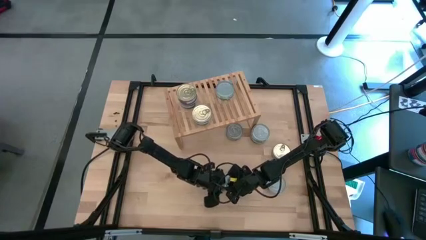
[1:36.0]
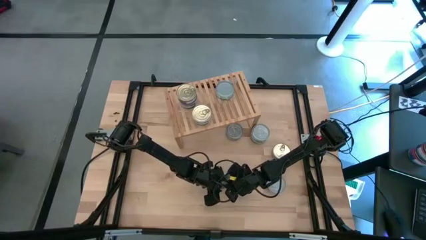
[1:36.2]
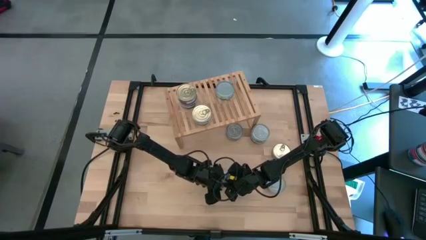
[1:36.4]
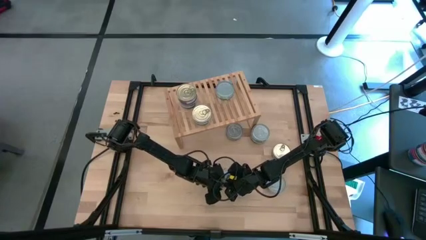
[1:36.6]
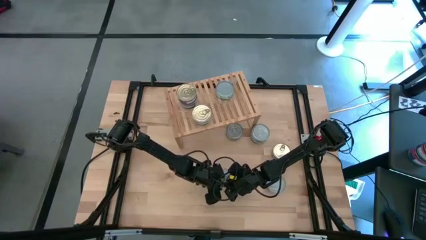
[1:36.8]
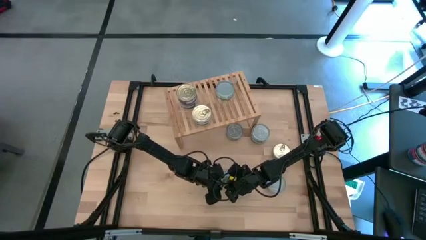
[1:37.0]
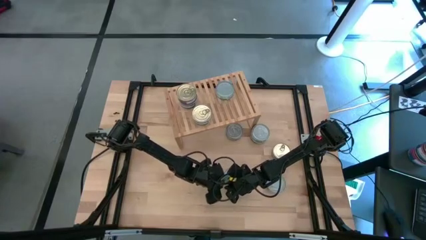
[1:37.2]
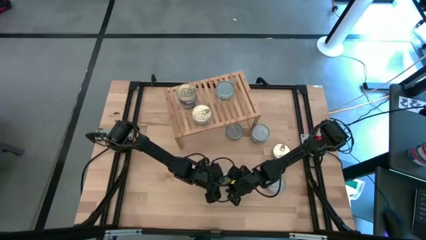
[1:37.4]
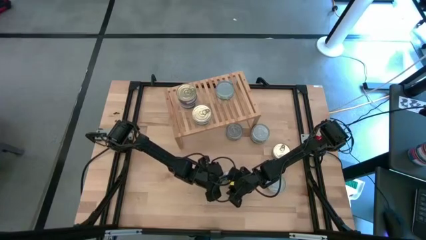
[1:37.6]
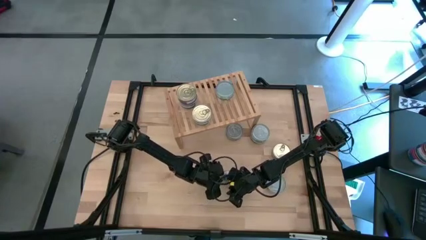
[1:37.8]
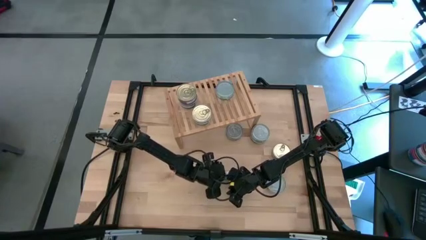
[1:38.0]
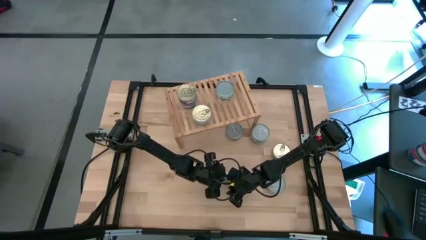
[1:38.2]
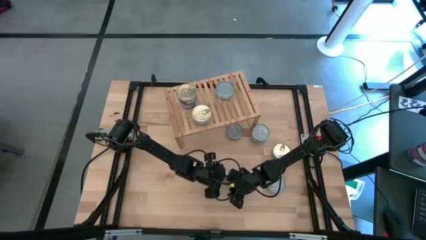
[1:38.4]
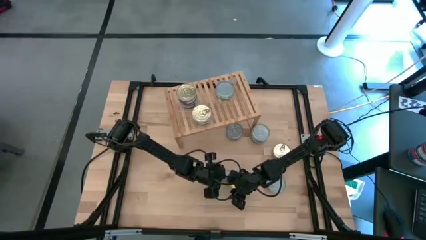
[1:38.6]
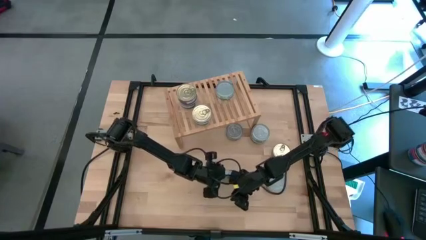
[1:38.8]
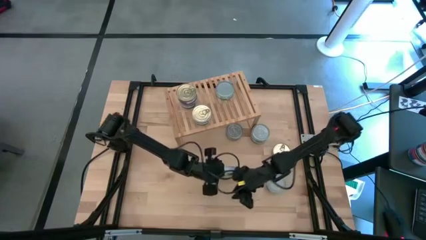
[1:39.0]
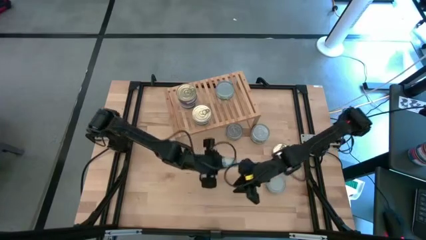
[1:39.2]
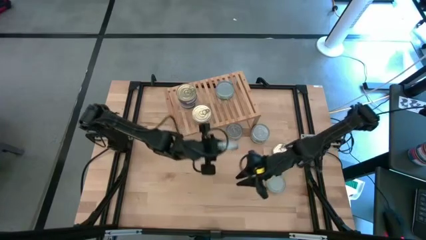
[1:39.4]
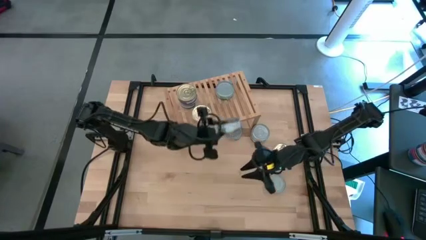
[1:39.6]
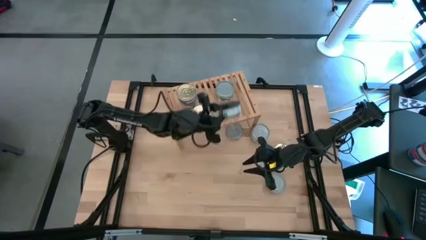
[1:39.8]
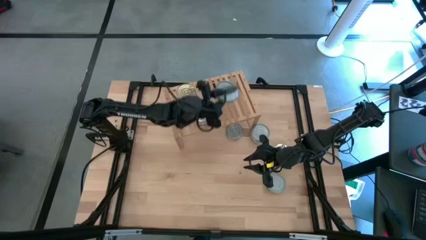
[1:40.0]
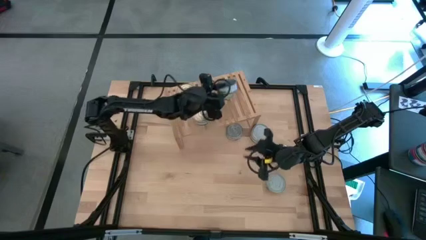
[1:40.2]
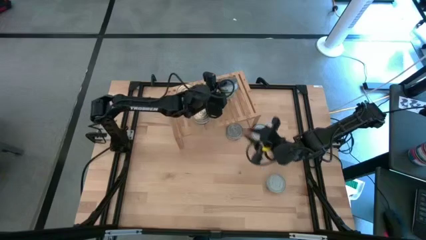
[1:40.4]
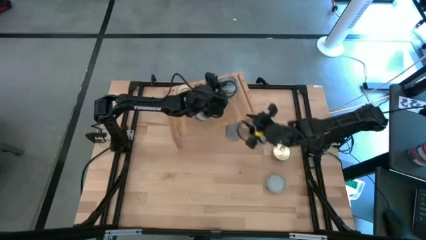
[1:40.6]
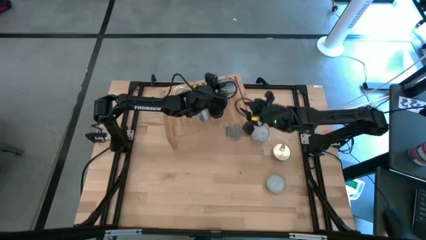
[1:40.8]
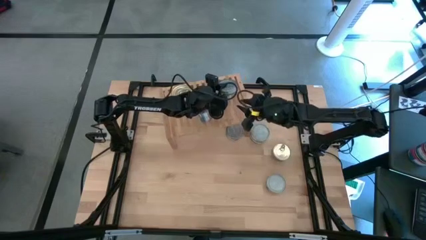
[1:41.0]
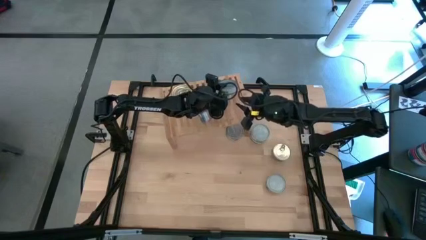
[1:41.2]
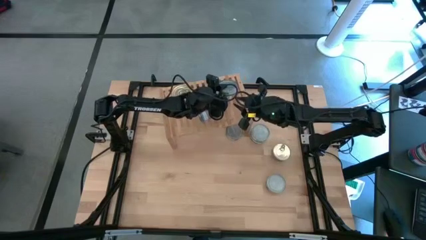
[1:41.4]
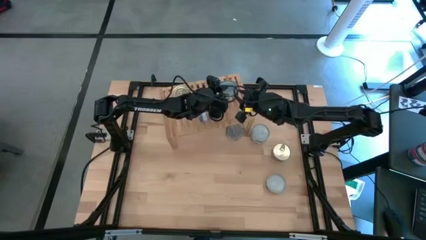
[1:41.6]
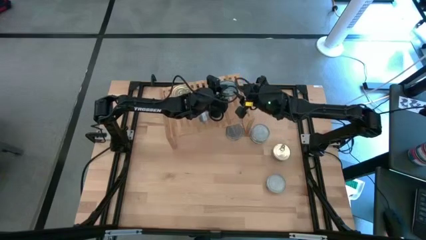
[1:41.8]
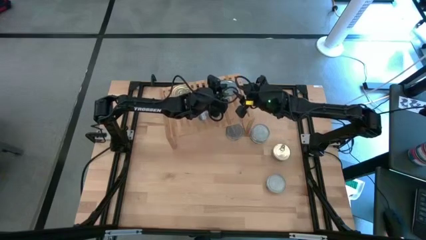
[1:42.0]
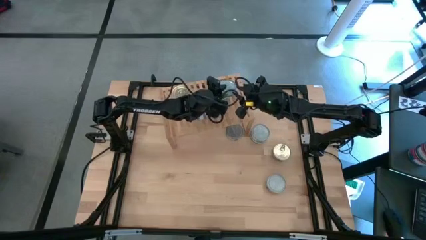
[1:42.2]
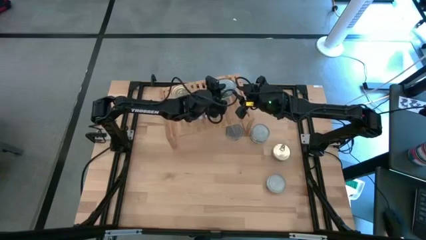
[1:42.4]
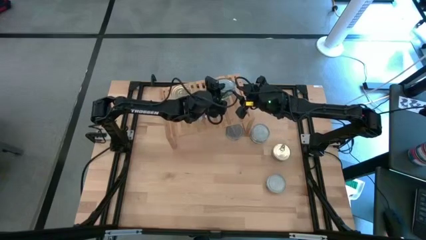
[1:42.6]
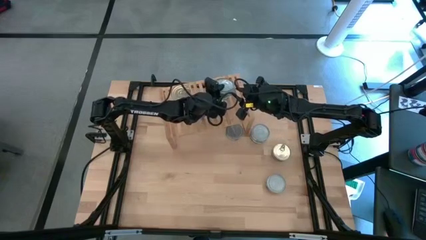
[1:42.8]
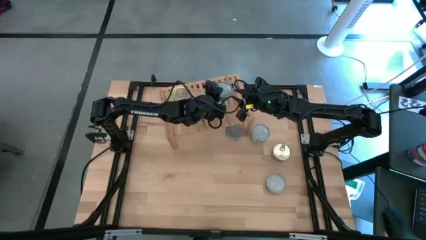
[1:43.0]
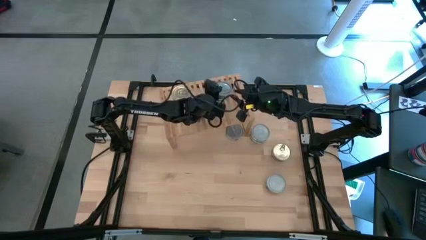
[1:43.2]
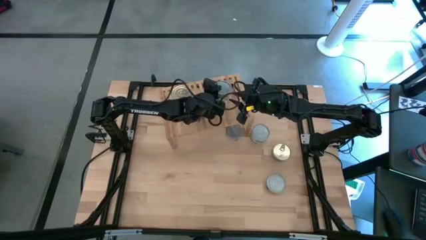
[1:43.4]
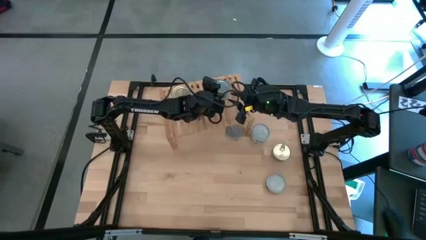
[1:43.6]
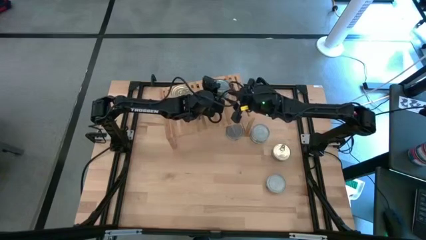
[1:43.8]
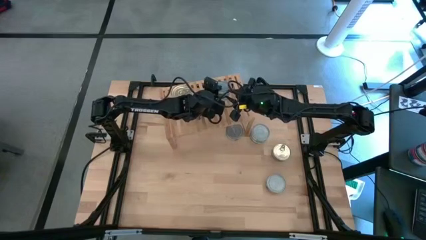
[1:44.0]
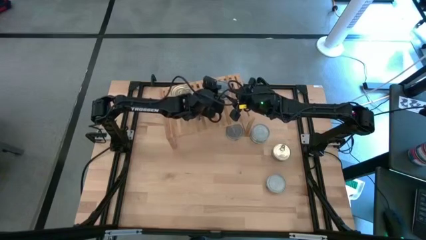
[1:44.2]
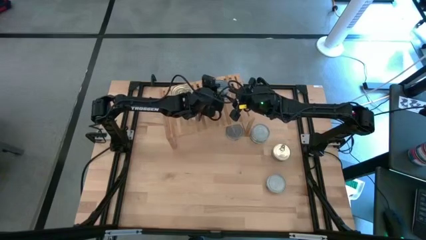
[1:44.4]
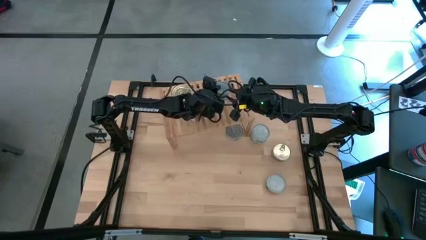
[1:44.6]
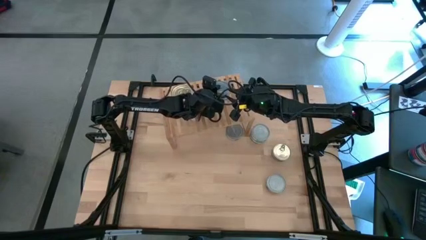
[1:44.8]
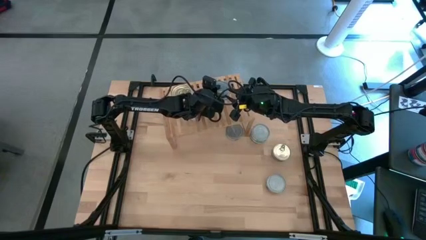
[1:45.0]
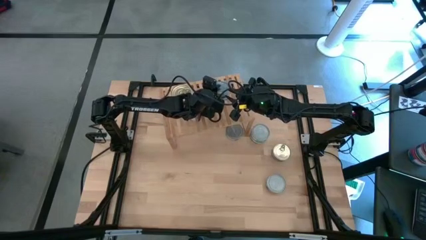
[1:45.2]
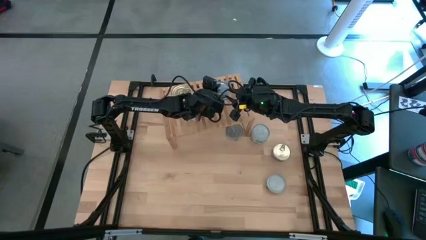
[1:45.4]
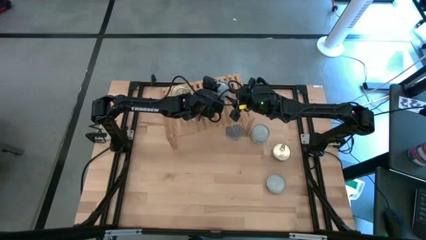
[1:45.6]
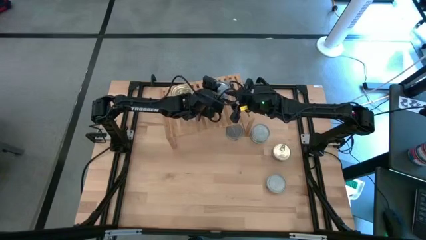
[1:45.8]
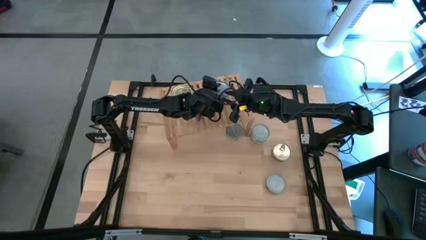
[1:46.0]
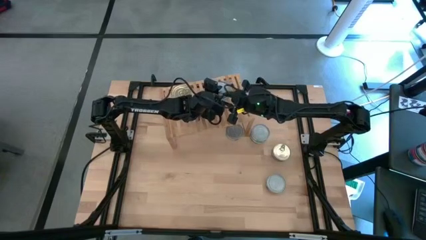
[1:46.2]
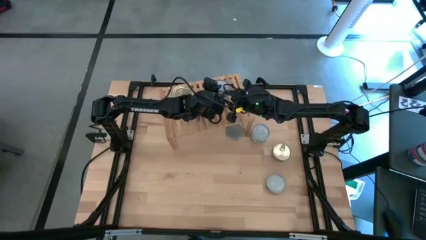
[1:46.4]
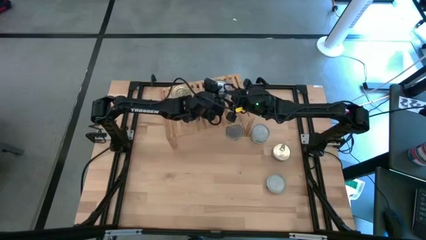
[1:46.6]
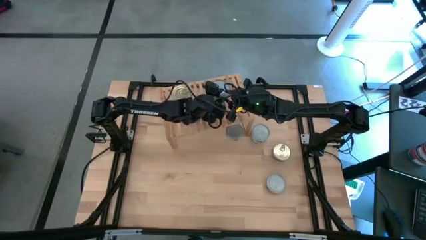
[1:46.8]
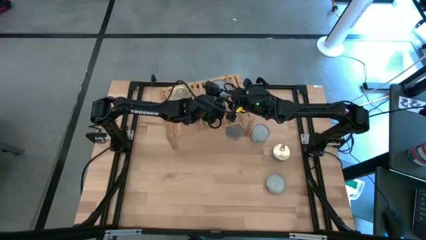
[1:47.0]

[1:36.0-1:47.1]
Task: Stack canned seafood by type on shelf
Stack the green tuna can on top of the green tuna can on the shelf

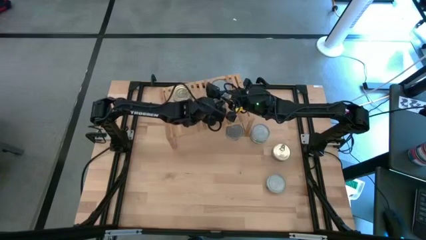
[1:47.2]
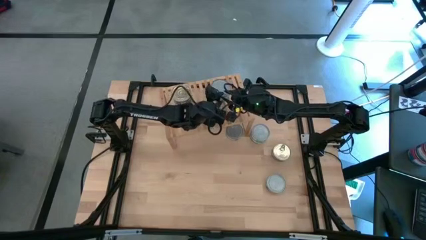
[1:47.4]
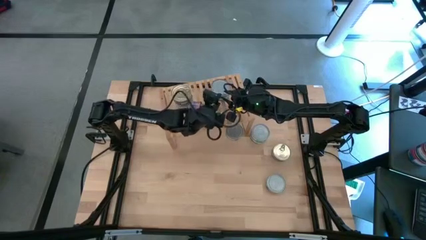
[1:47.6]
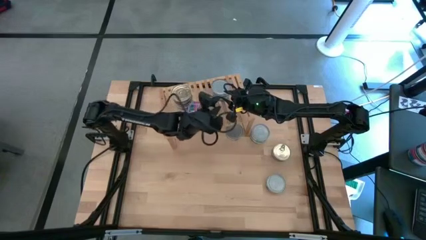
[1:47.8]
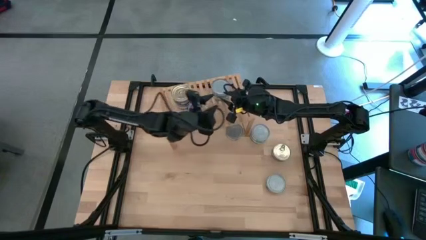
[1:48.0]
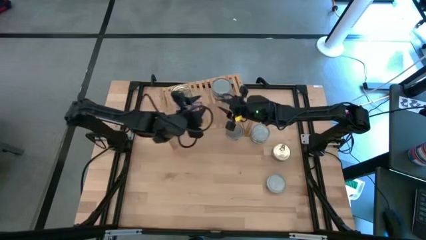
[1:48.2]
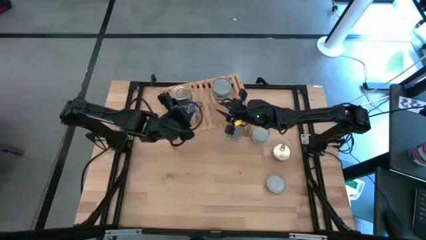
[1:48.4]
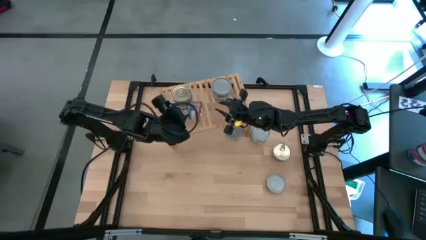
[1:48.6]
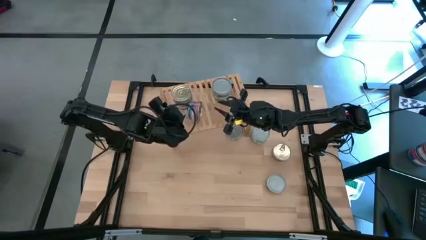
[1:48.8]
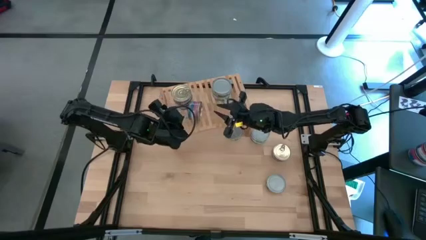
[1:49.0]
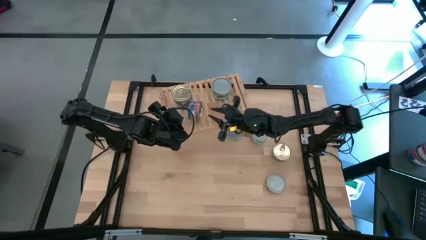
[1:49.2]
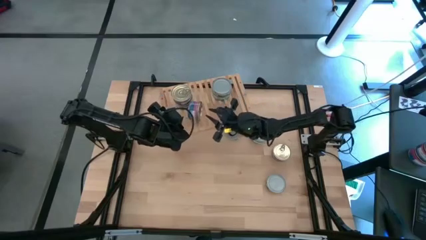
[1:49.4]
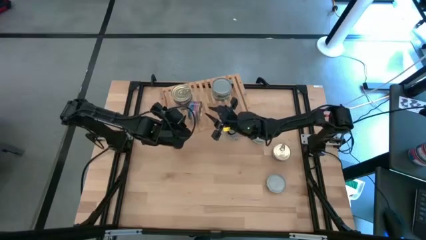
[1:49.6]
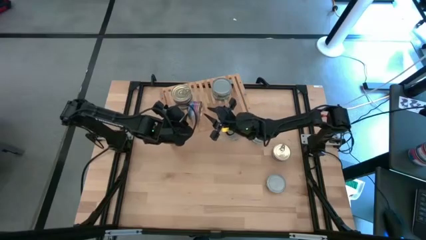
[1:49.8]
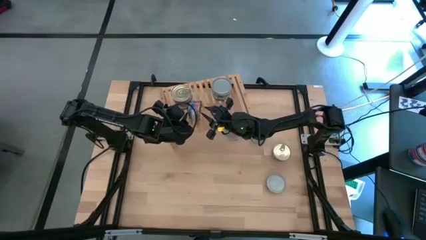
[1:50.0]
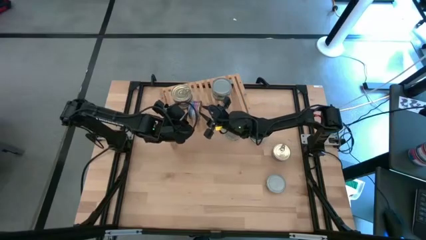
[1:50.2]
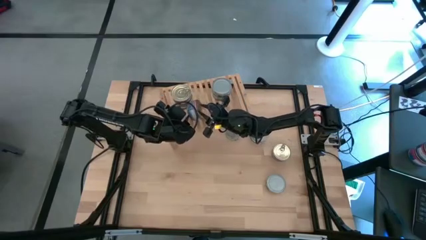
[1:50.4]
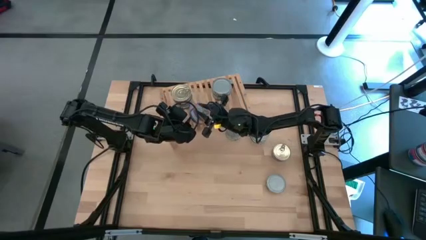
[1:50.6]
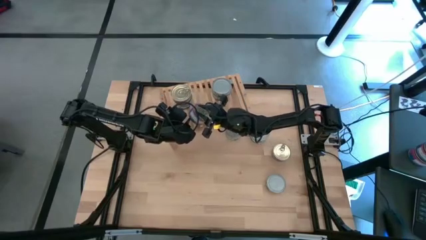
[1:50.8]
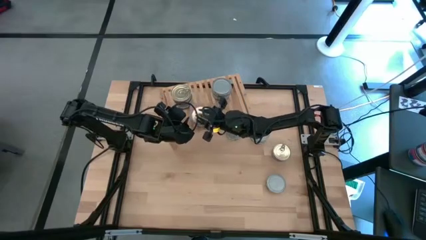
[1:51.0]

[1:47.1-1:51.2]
Adjust the blue tuna can on the shelf
